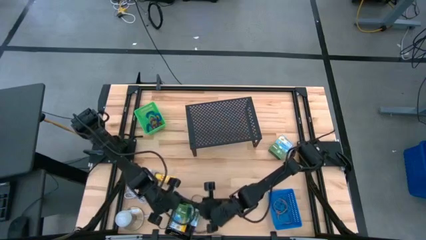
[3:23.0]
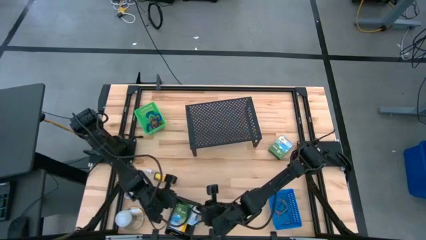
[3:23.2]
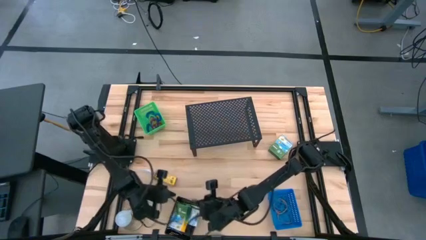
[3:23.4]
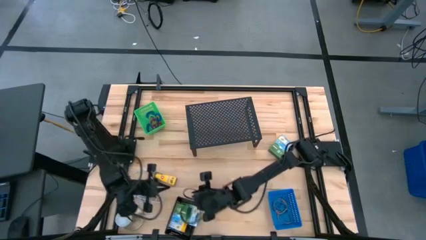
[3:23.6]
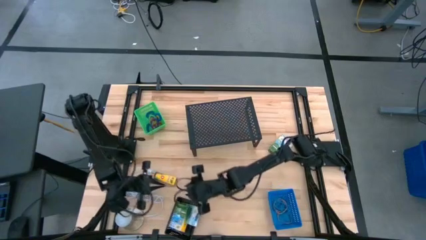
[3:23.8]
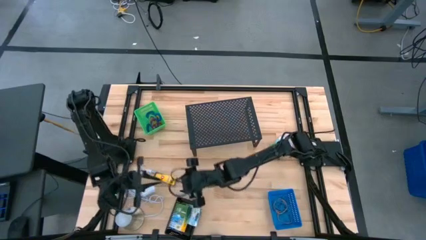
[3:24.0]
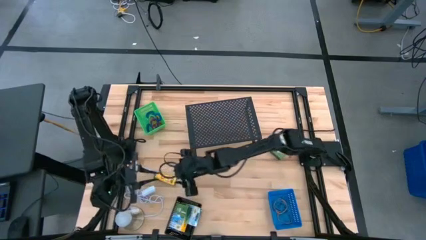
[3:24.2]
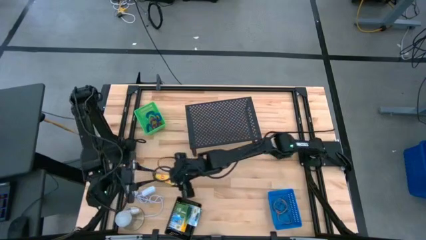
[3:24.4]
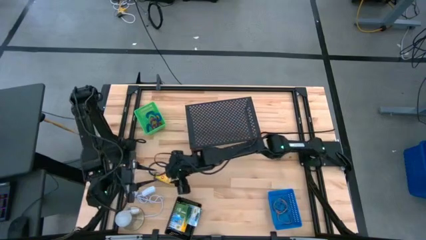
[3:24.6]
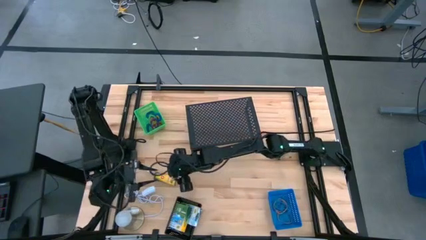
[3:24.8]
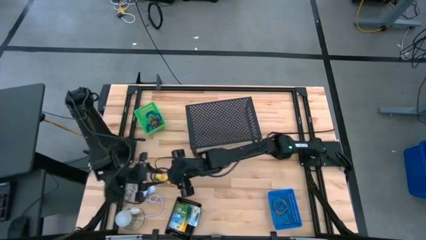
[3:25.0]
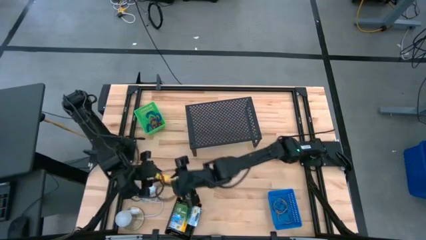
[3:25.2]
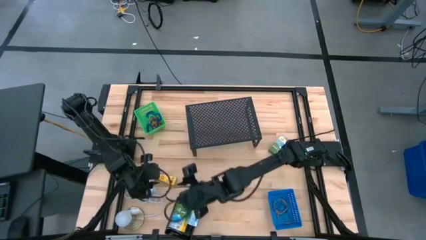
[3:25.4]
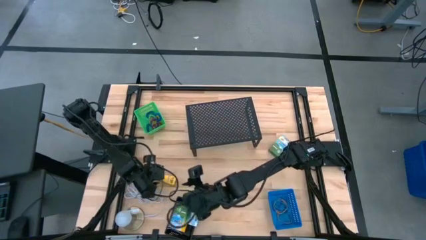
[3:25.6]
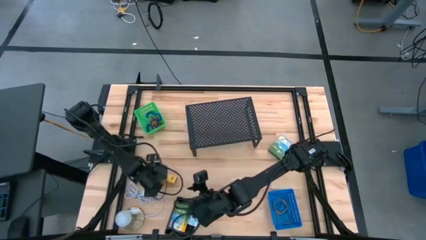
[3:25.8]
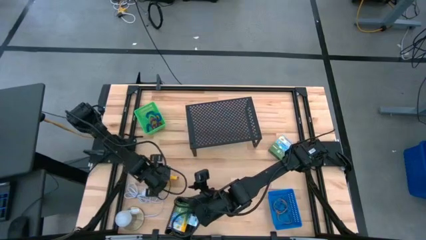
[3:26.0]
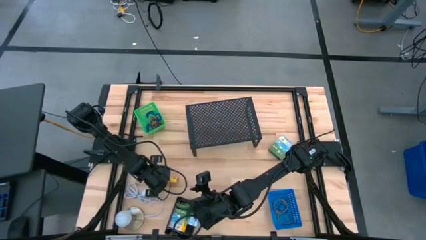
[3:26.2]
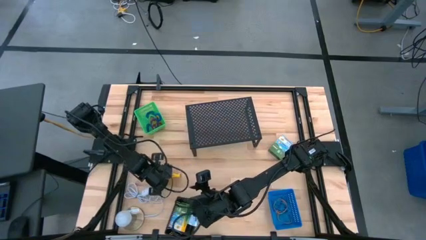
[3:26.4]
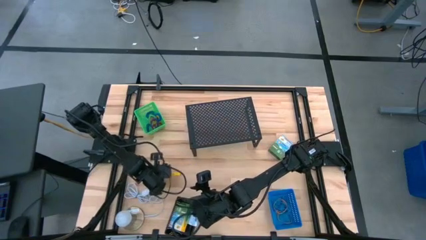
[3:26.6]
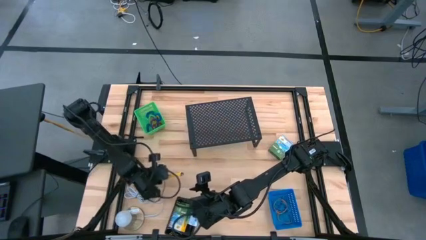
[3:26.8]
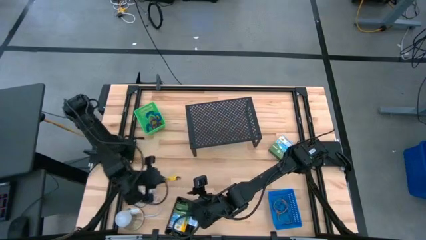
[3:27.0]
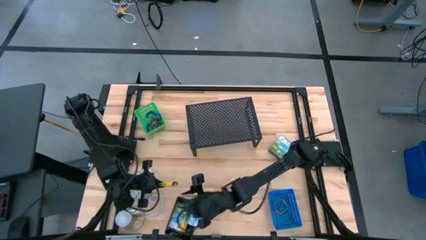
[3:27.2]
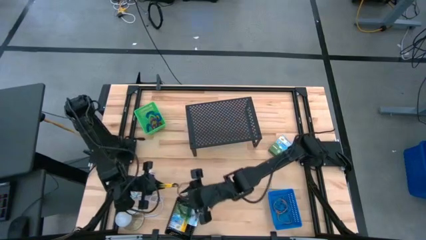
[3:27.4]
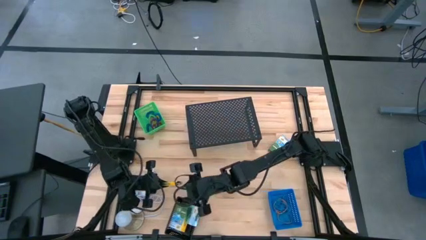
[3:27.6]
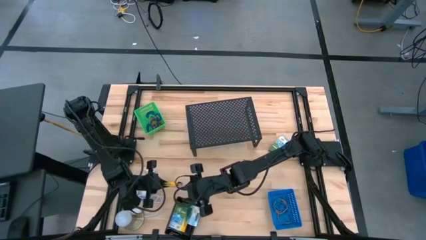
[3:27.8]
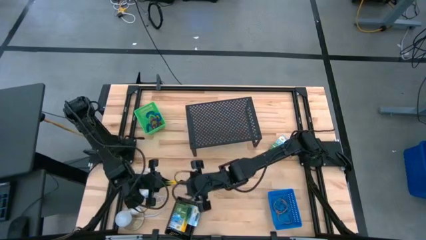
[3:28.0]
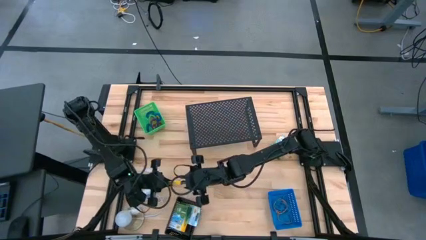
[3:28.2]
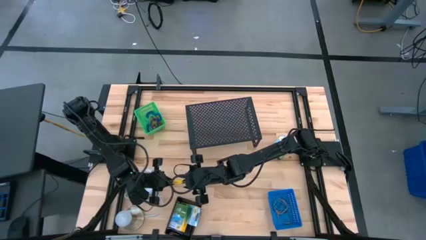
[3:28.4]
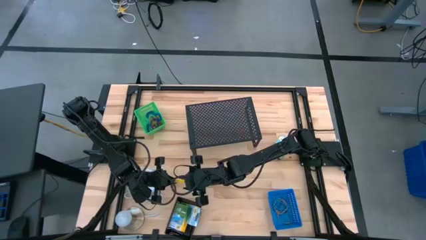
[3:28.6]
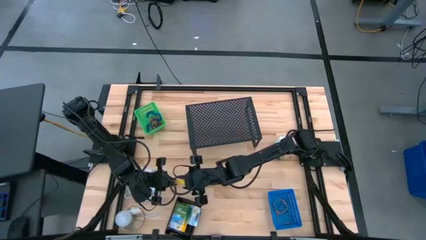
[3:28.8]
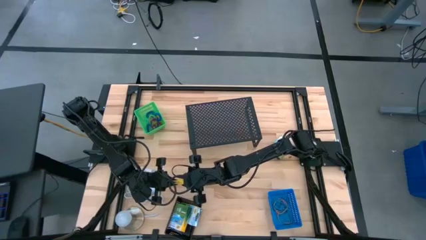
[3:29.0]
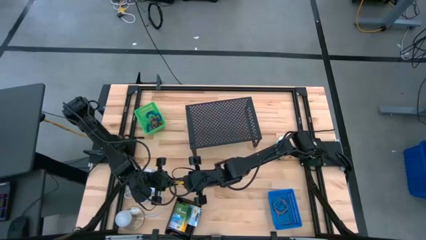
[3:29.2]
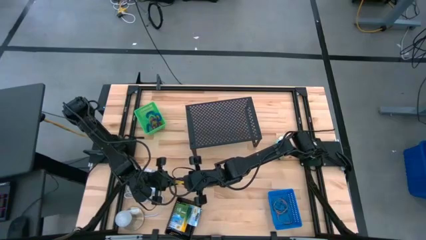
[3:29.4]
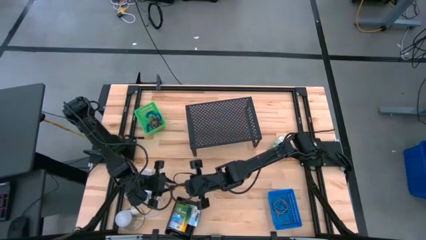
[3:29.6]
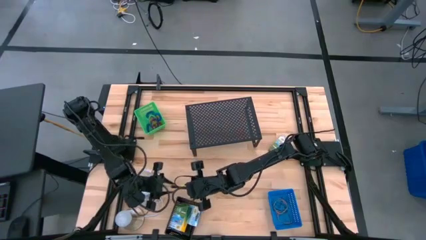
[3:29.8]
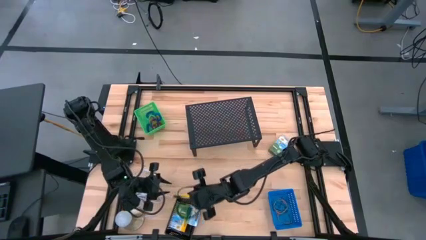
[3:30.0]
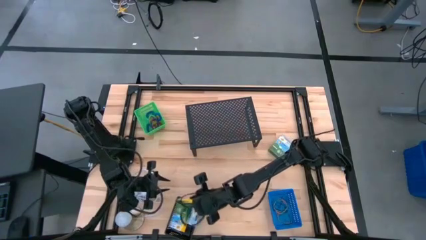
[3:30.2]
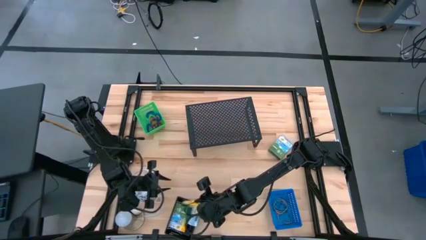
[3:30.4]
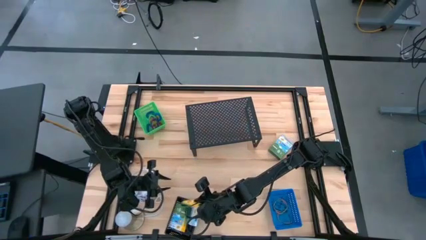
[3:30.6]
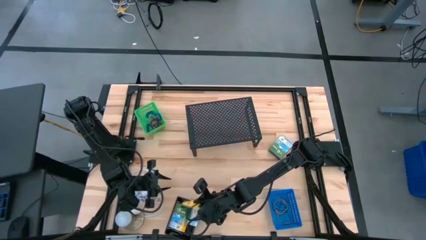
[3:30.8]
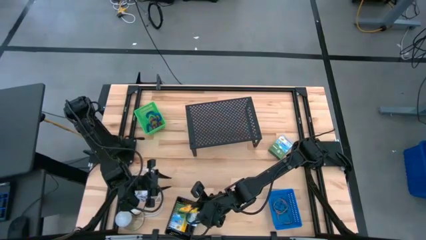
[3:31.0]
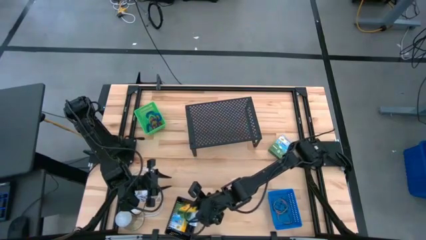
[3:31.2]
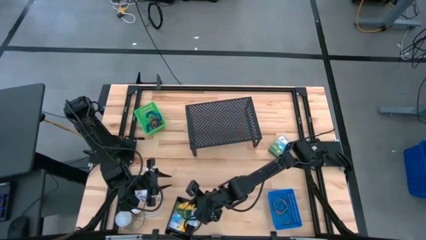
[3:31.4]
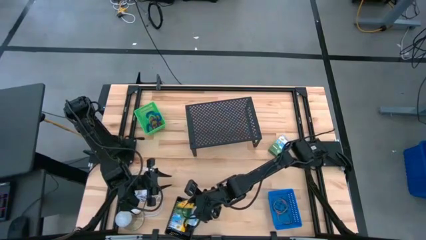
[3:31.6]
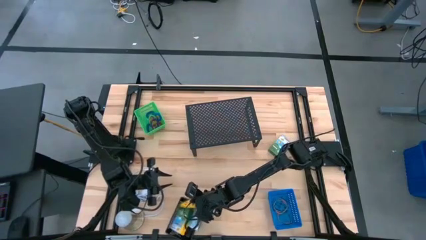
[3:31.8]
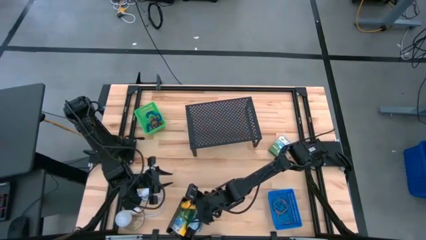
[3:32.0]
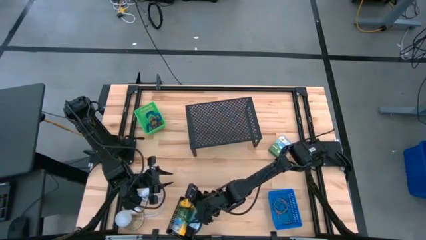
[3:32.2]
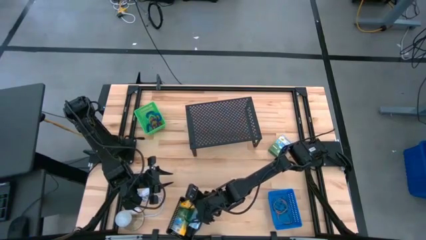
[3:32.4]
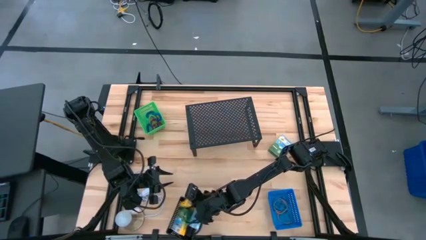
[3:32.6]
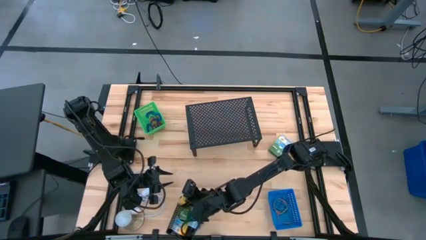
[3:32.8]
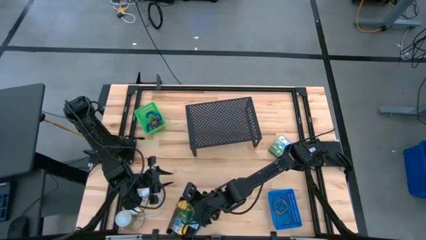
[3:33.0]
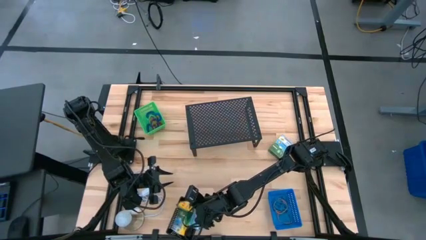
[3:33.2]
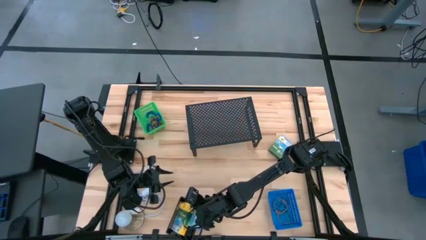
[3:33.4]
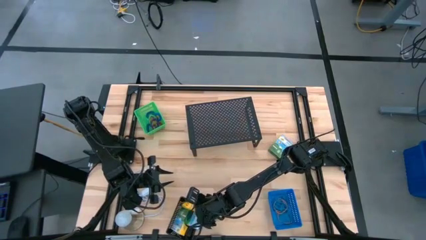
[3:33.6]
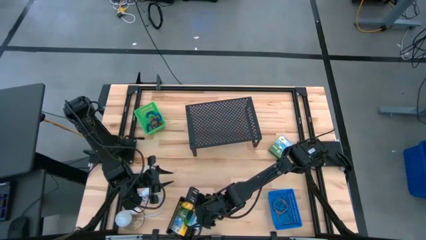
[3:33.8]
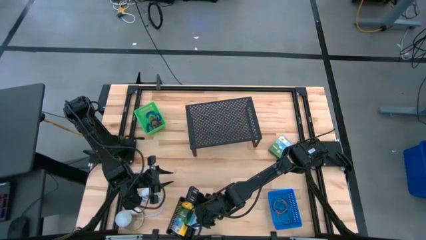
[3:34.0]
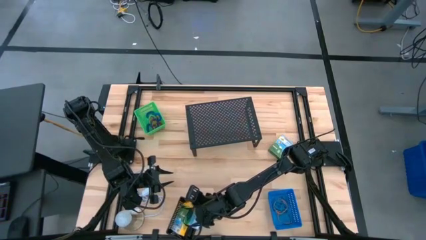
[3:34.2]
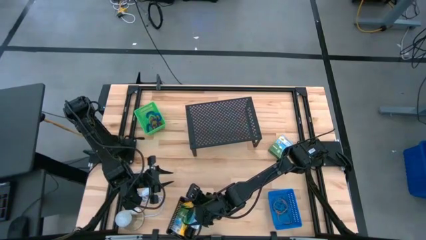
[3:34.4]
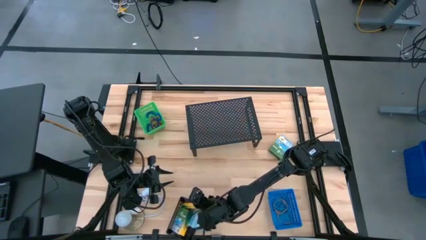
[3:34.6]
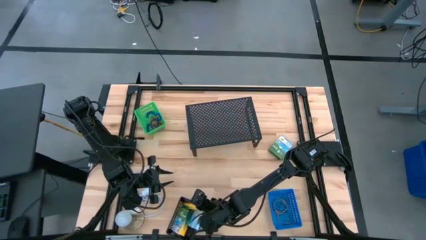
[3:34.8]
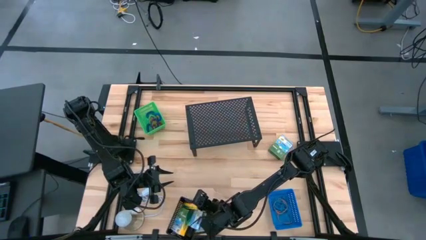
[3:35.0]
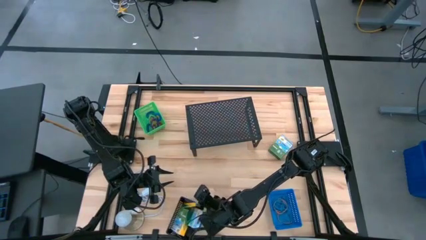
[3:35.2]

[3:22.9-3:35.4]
Task: Pick & Place Office Desk Supplies
Put the yellow crayon box into the black bin

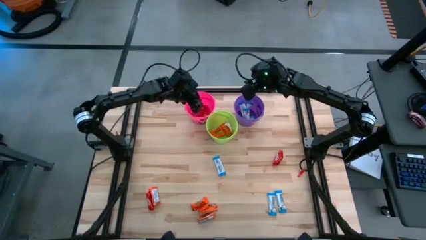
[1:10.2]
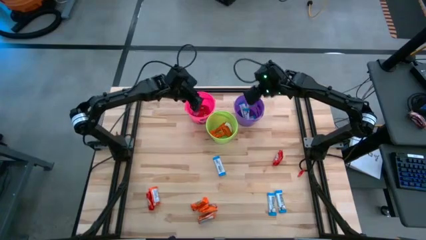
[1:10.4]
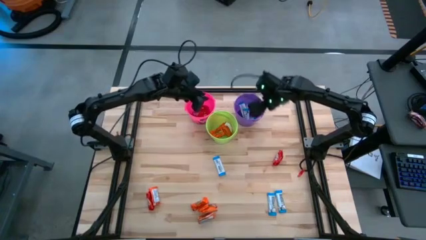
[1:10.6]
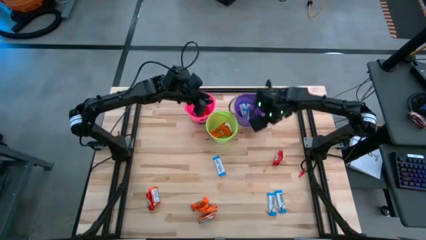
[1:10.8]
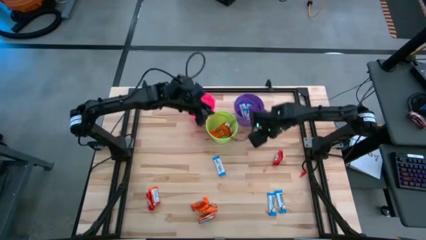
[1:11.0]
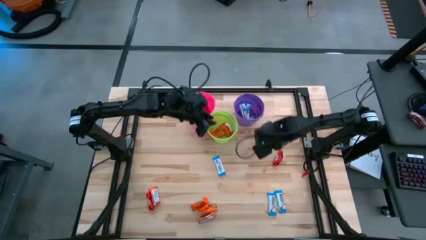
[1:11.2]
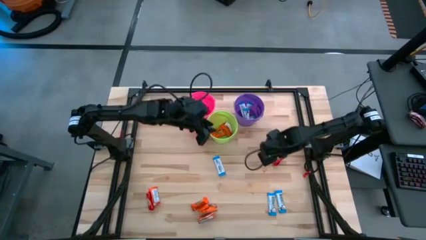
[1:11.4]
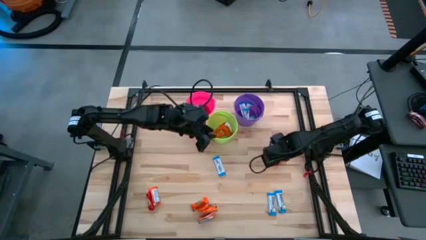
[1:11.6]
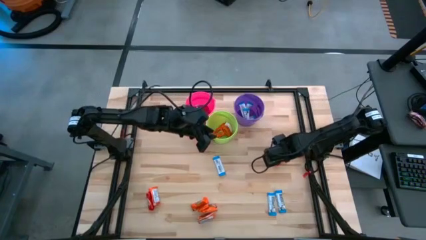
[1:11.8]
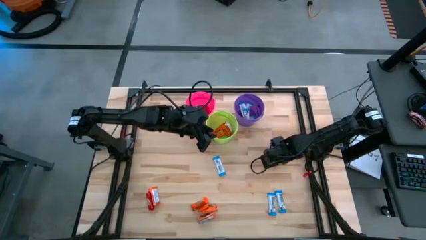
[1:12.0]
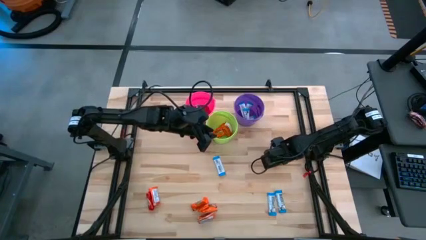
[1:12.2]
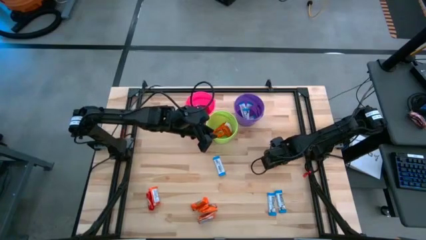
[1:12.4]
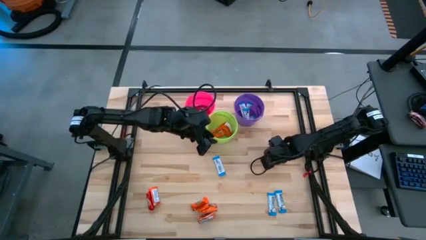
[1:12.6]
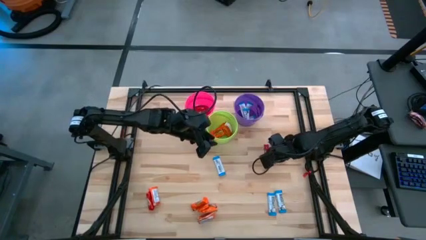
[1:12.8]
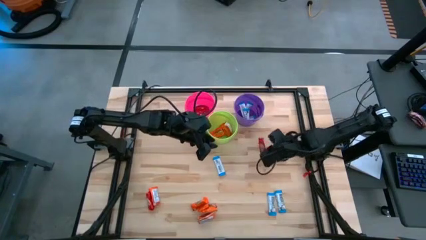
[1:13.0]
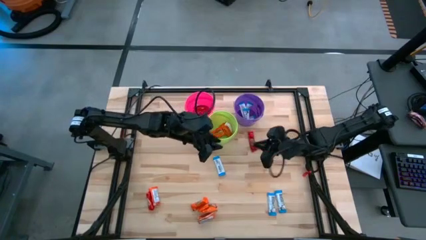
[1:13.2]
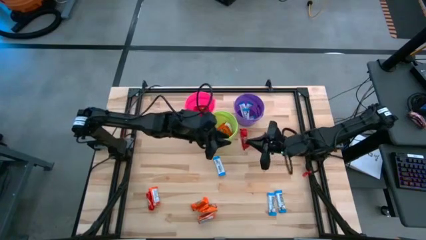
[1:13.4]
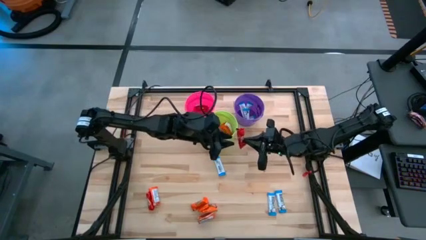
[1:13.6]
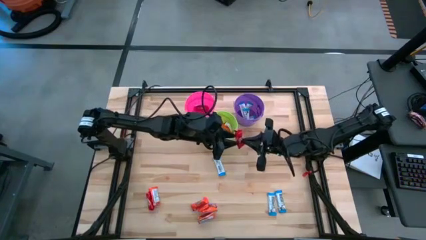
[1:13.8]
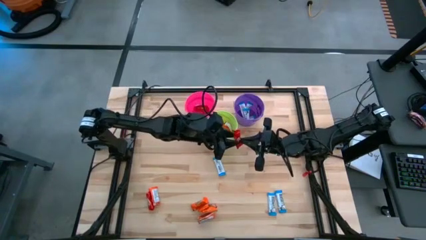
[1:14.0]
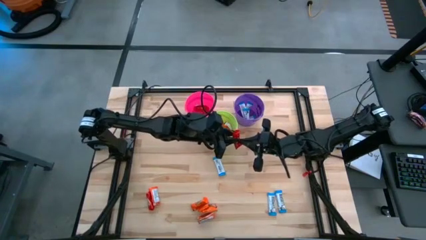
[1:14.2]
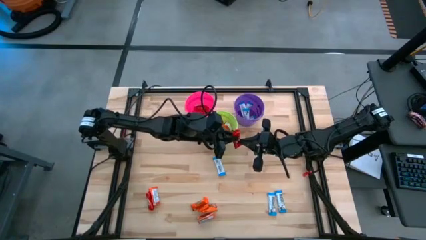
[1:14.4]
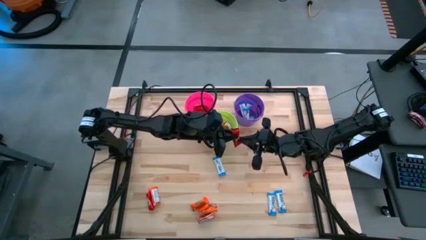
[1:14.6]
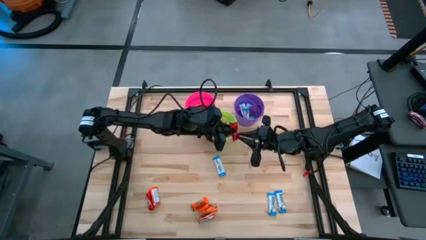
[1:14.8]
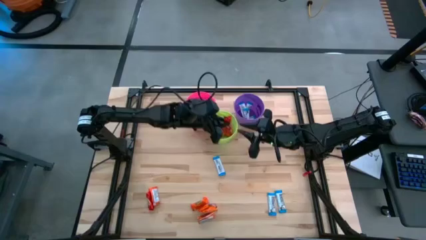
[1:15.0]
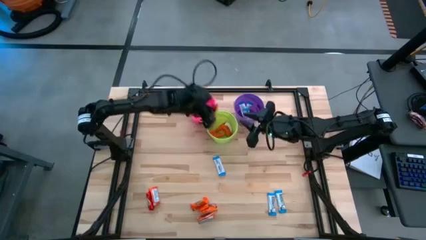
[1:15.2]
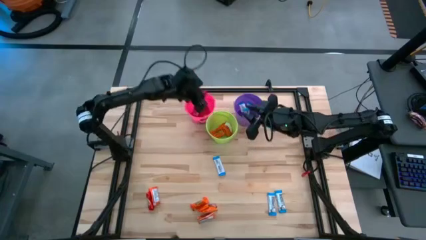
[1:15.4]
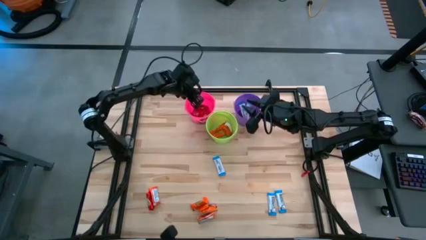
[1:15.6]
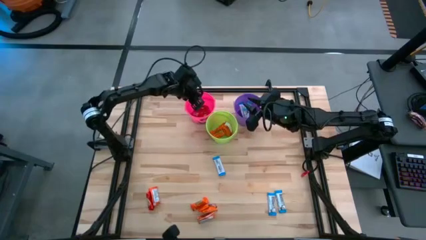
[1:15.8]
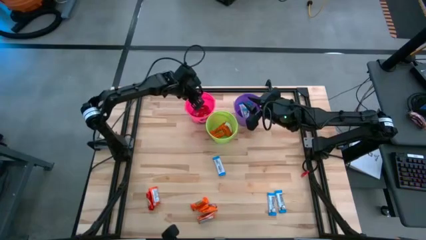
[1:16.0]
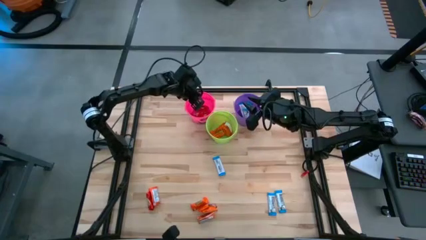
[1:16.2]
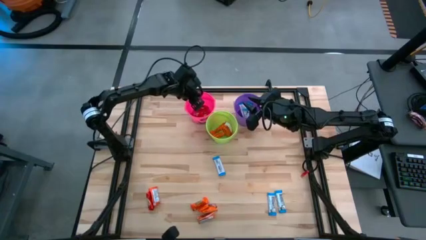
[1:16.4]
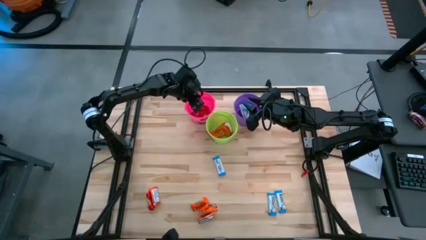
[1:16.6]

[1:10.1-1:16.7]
Task: Sort candy
Put the red candy into the pink bin
